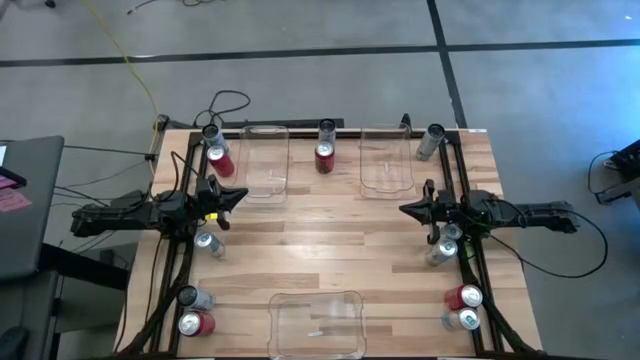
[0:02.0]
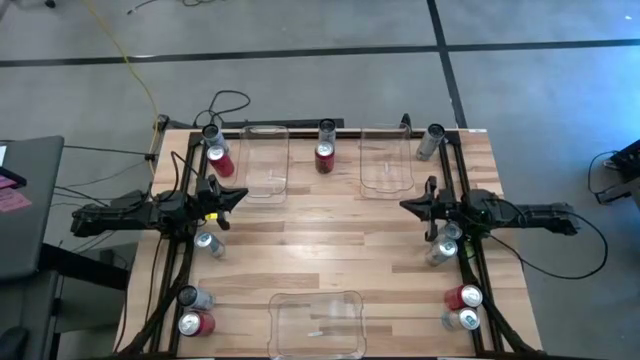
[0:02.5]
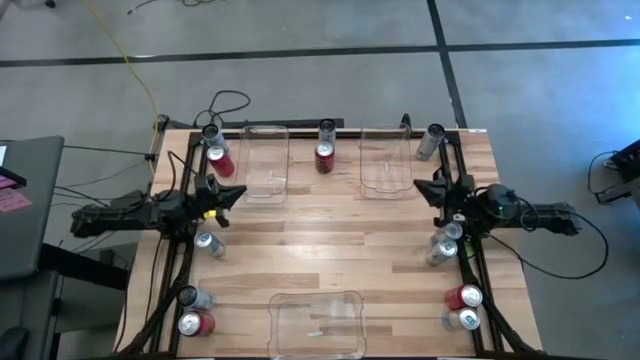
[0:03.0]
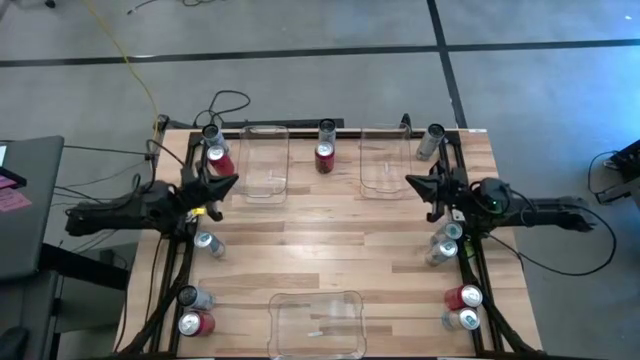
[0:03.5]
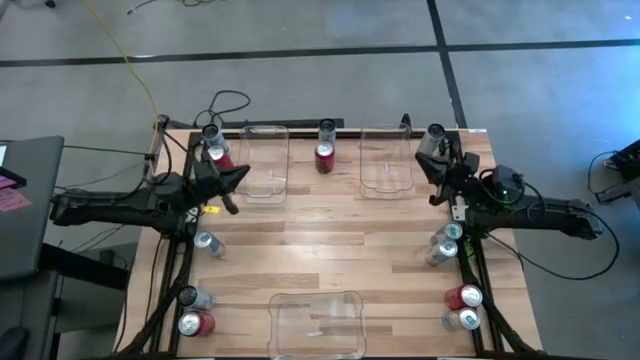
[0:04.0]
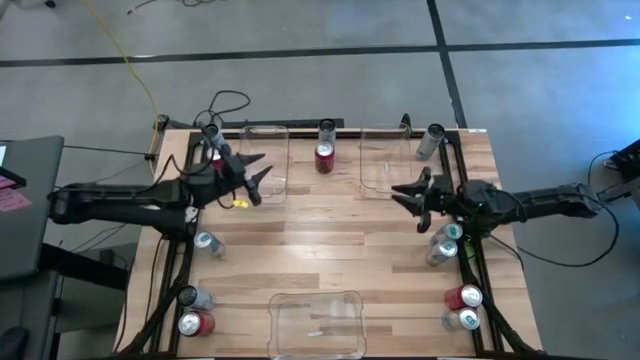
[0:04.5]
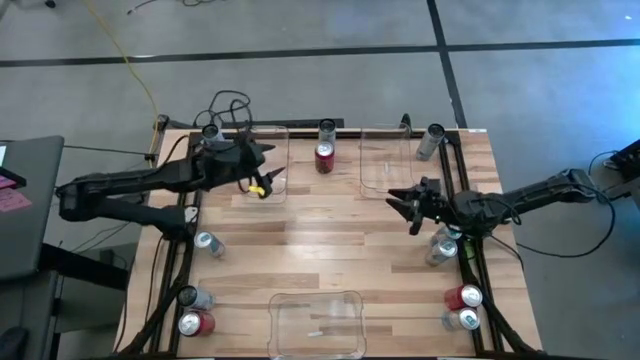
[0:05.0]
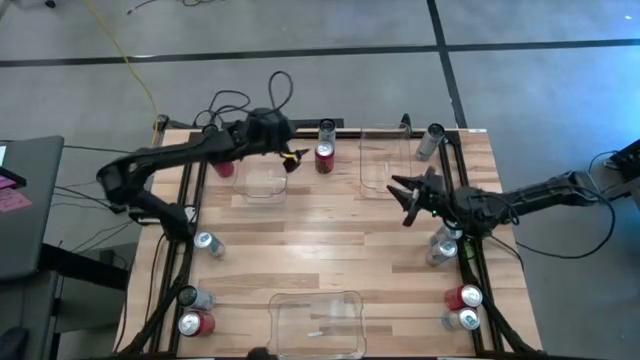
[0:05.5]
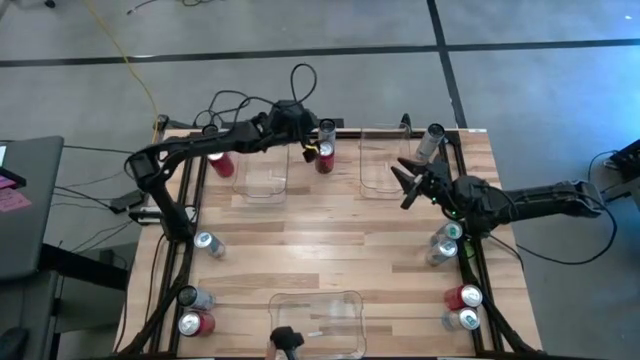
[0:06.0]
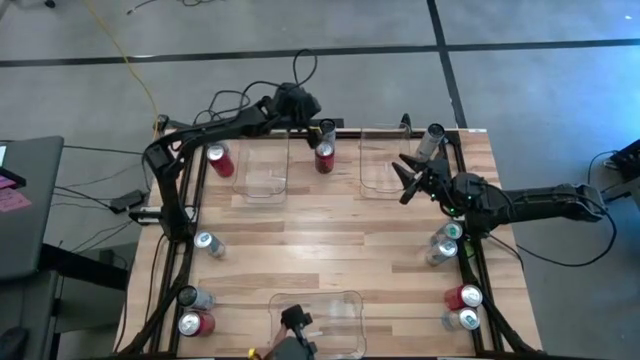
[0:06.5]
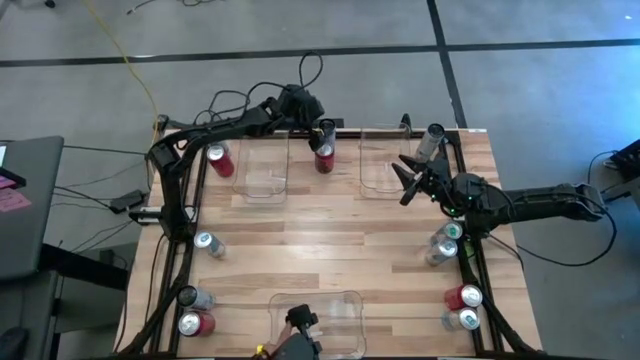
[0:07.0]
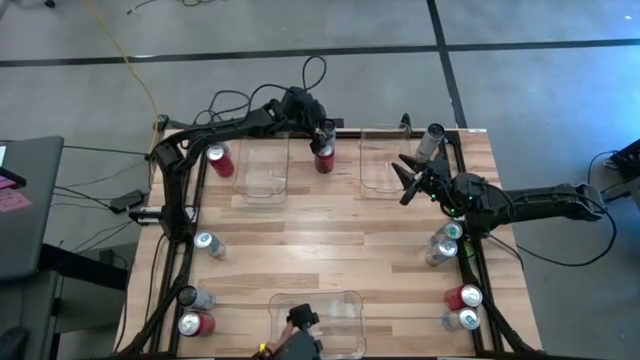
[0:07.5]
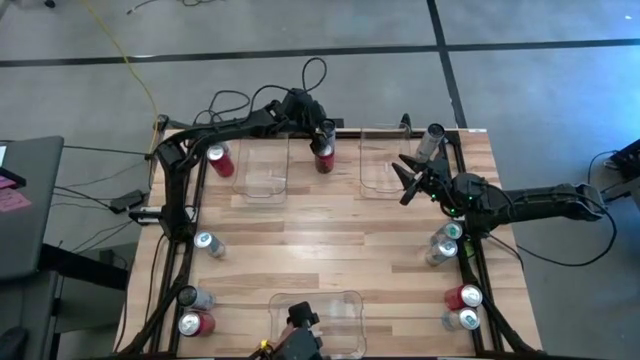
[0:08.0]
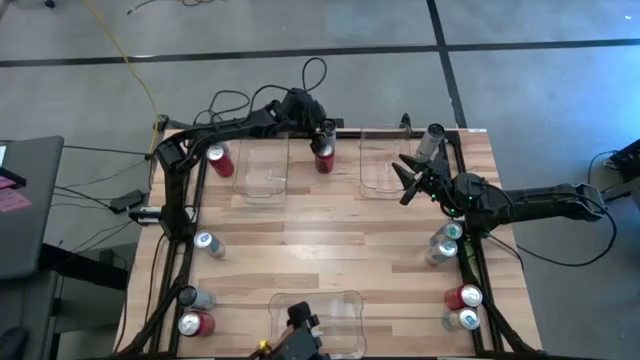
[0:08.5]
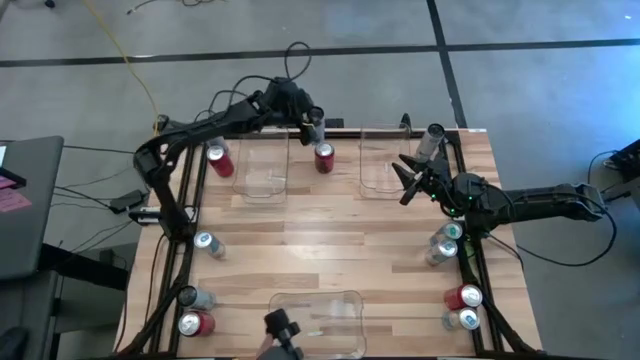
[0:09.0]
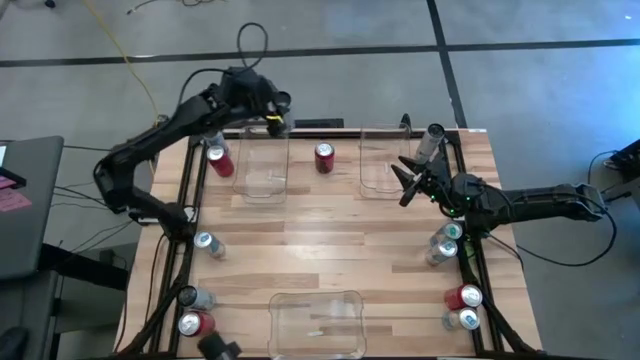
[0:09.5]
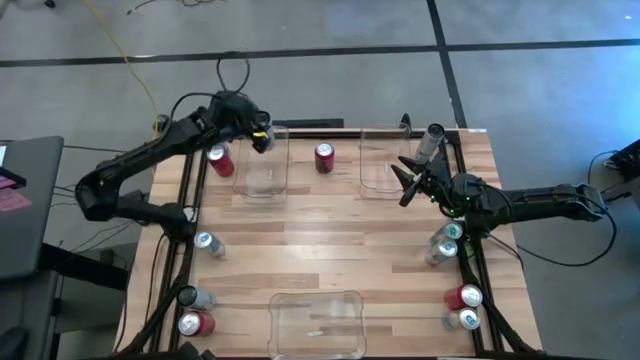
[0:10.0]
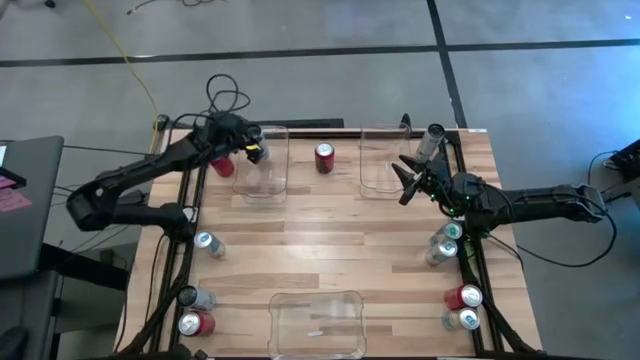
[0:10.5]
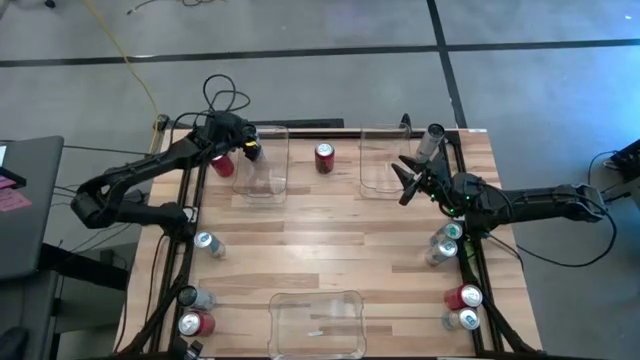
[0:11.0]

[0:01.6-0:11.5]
Task: Sort soda cans
Put the top center white-blue soda can into the top left transparent bin

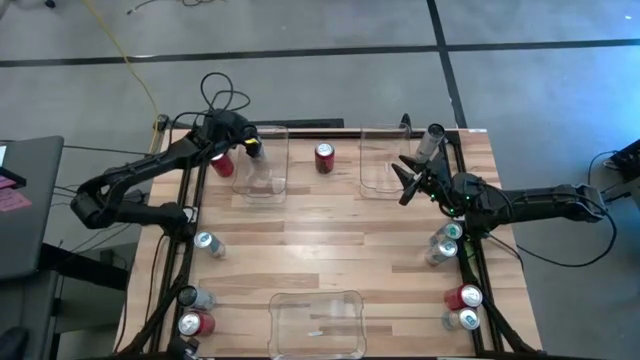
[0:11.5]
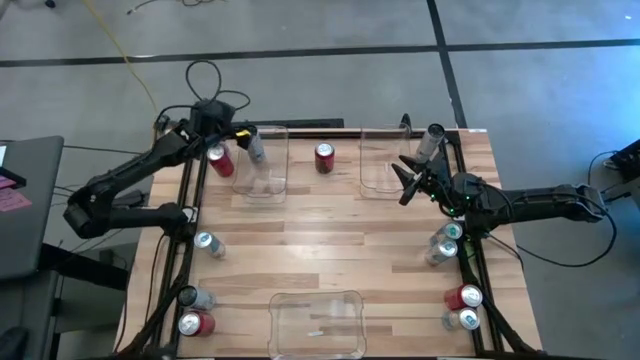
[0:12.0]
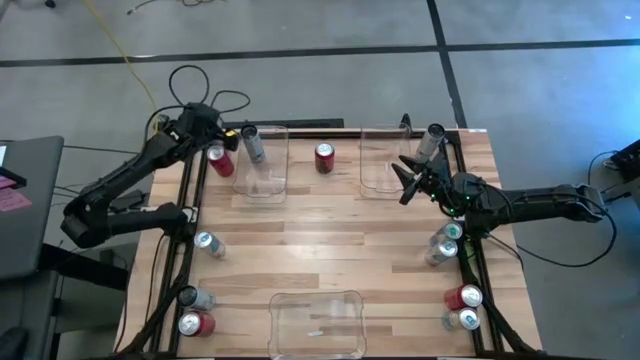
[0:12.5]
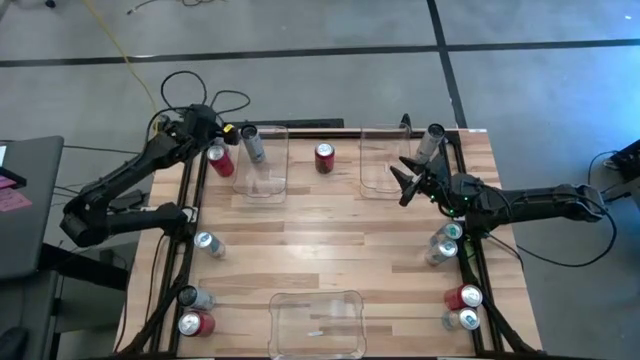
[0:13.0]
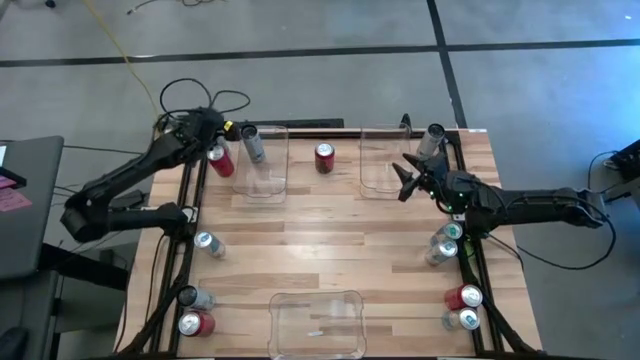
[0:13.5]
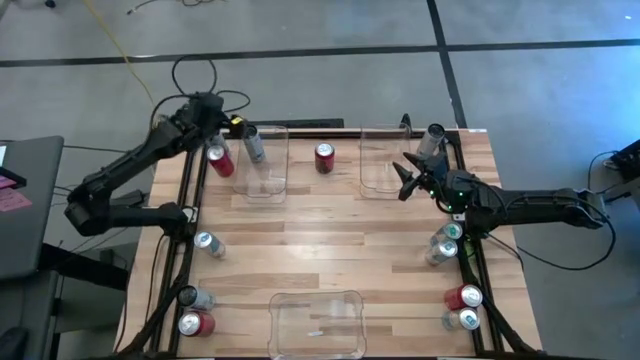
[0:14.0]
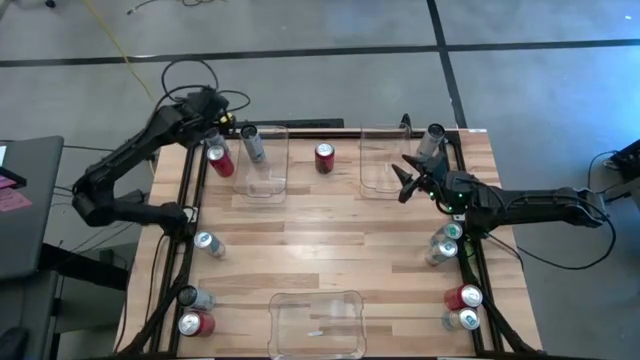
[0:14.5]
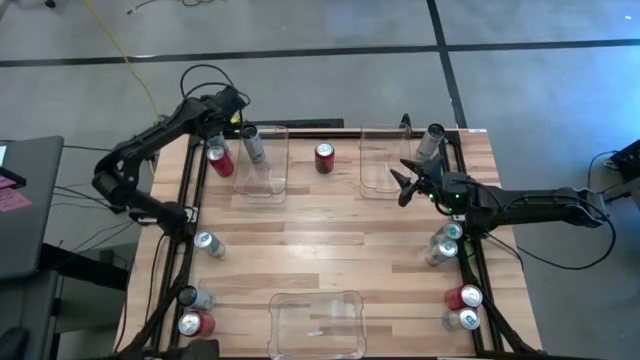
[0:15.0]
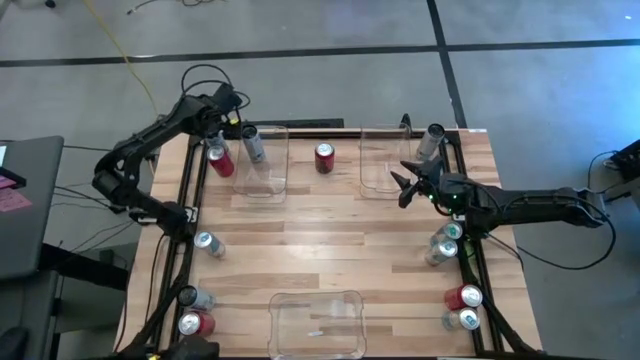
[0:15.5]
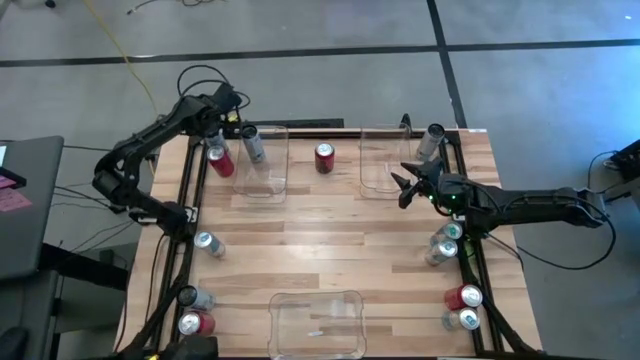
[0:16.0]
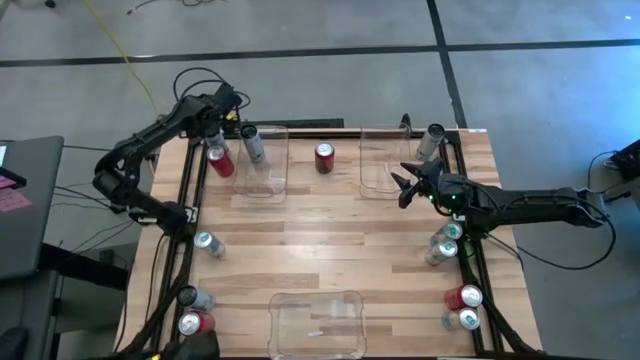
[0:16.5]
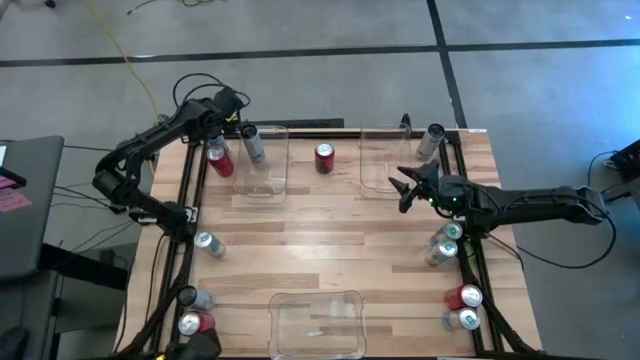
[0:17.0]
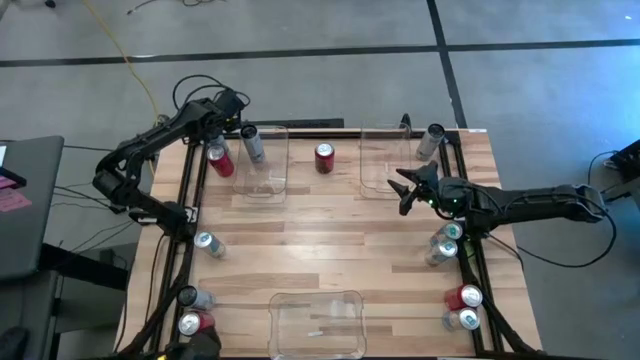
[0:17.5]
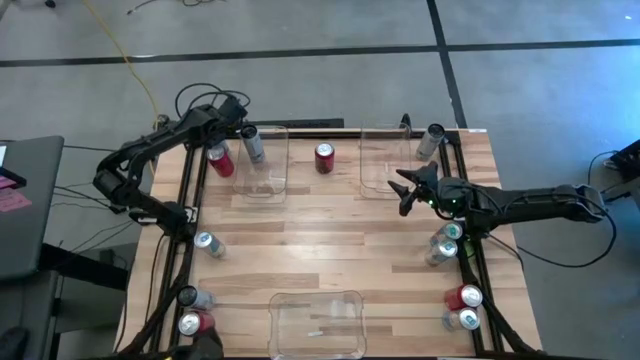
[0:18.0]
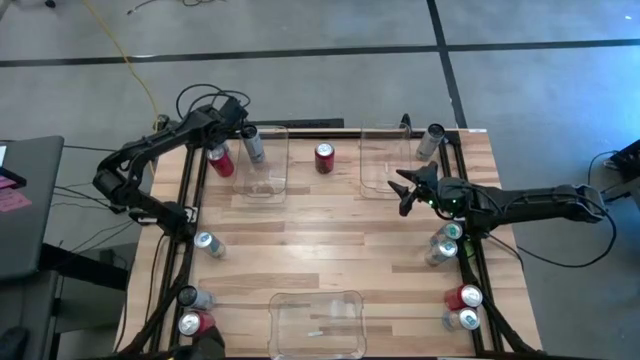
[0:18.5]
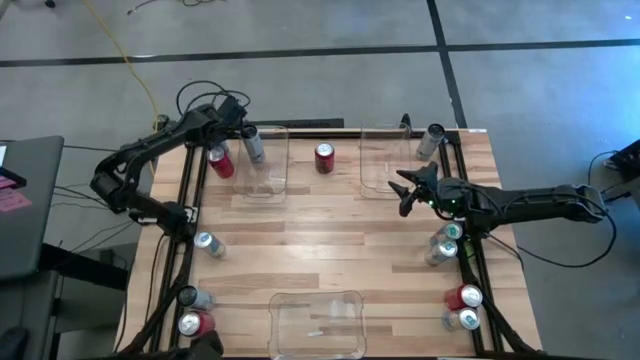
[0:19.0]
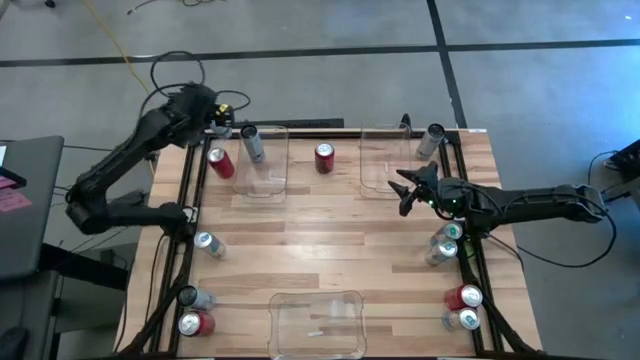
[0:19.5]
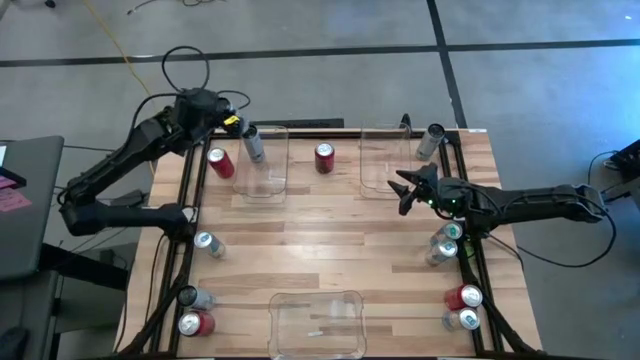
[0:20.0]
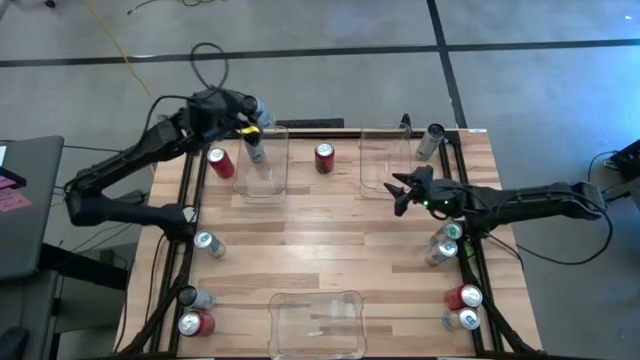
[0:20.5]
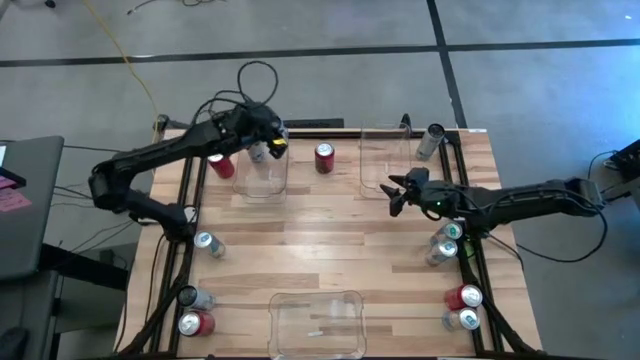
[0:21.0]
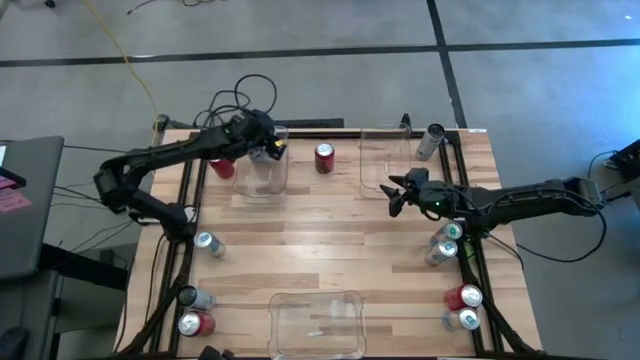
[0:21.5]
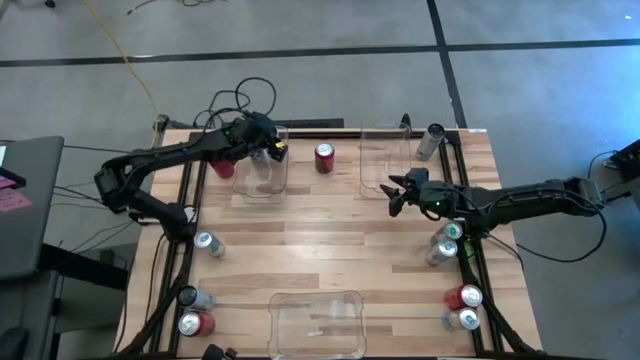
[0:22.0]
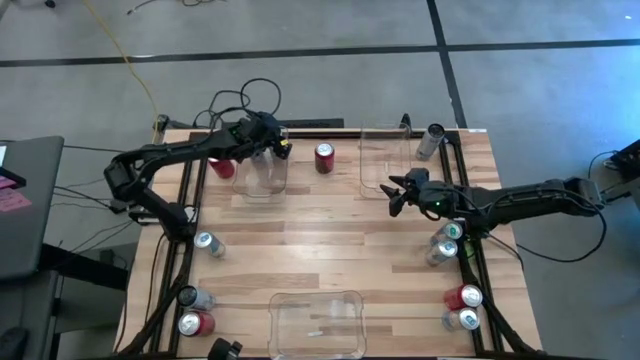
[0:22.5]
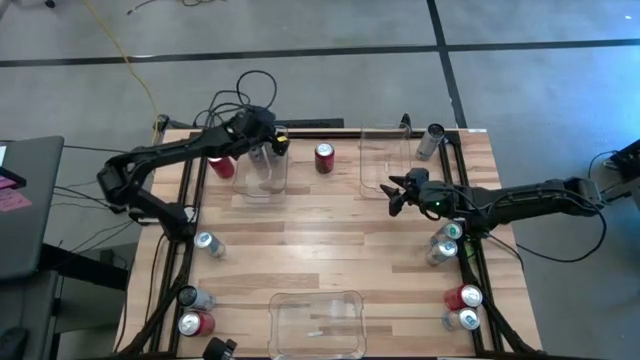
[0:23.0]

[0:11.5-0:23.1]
Put the top left white and blue soda can into the top left transparent bin
